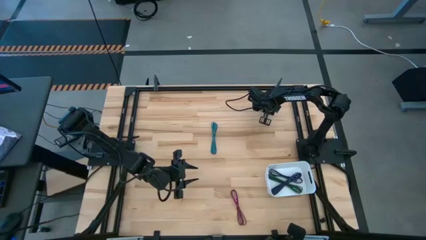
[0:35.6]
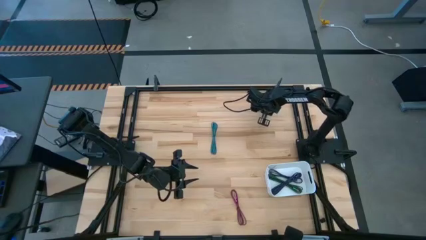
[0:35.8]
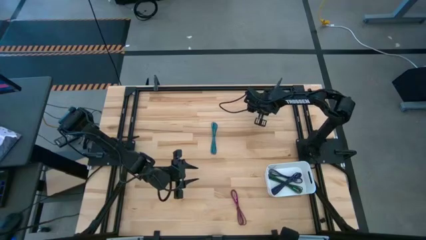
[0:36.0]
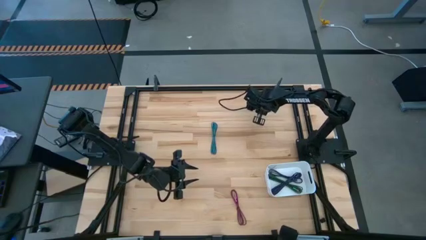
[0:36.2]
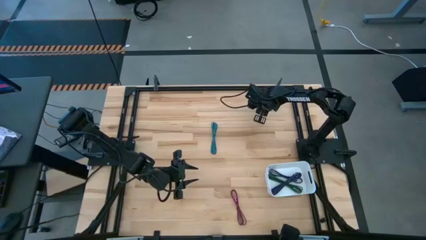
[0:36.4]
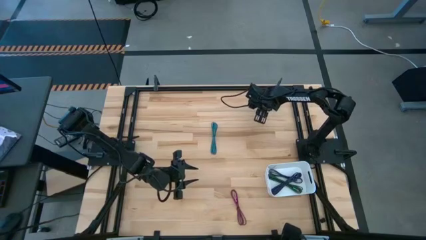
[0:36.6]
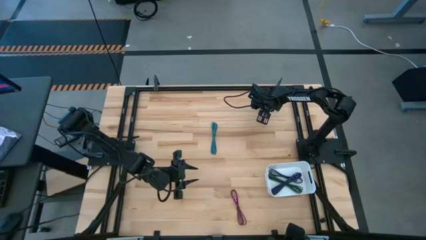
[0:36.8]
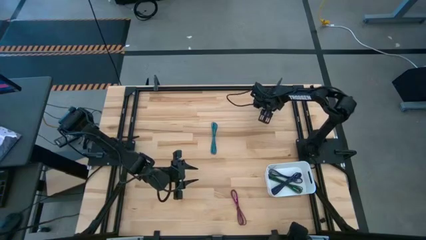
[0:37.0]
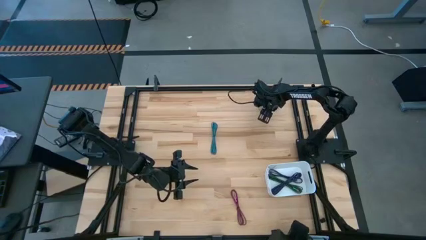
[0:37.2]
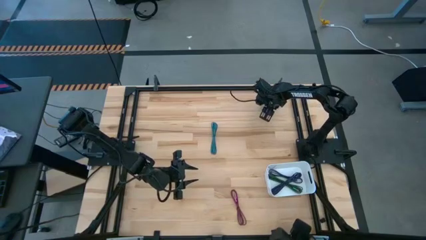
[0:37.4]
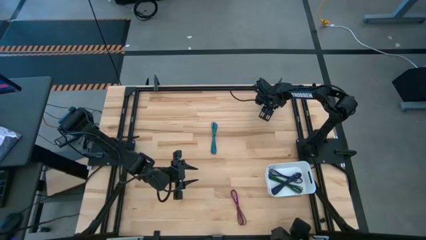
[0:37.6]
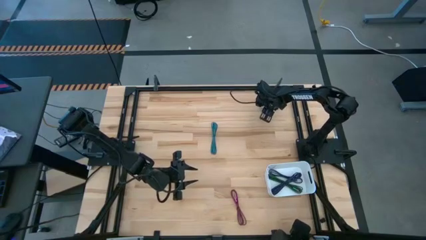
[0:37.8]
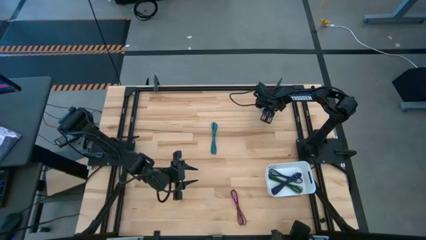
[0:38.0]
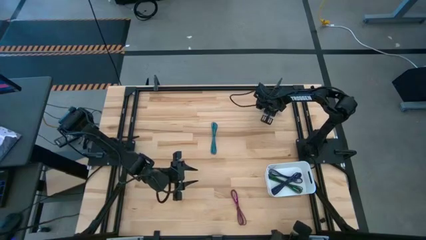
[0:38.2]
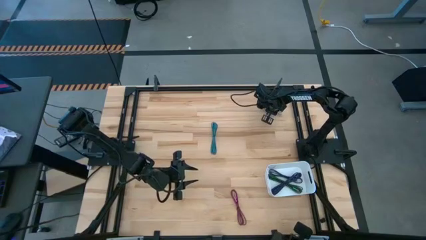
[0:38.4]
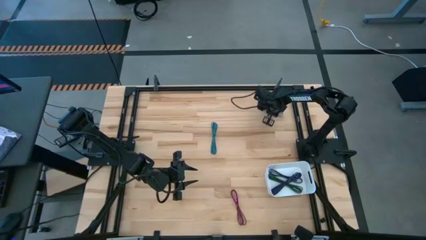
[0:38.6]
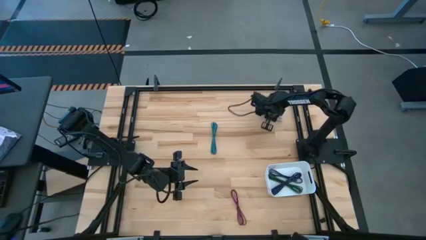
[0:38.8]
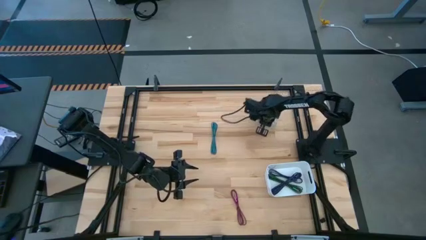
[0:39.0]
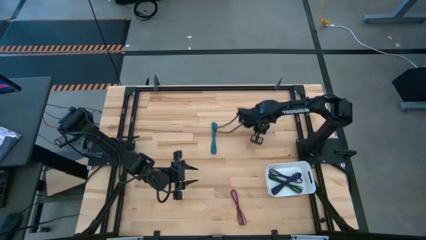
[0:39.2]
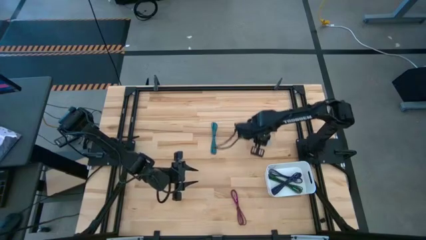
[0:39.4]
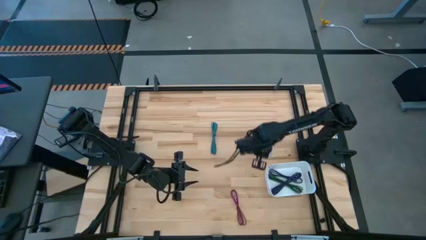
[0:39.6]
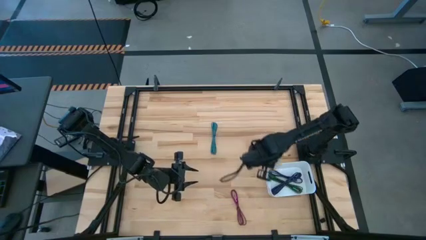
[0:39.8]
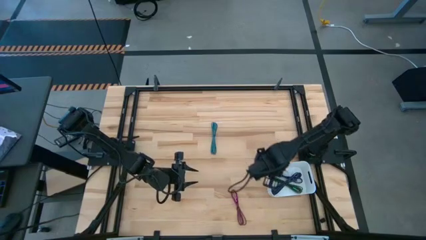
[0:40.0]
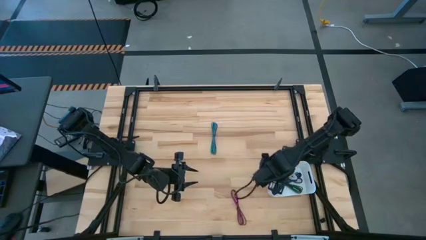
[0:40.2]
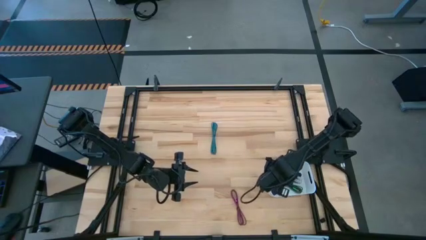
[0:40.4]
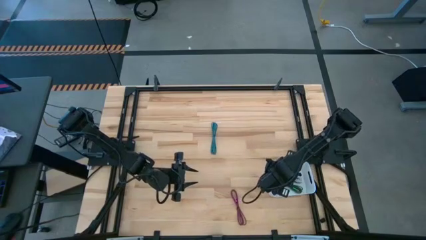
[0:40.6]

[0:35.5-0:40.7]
Task: Pick and place USB-C Cables
Put the white charger cable into the white container

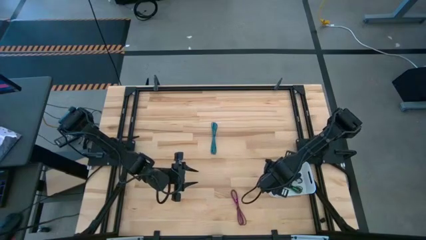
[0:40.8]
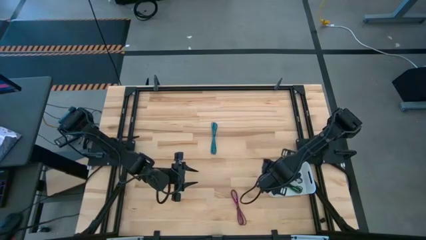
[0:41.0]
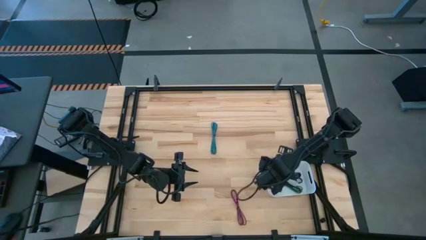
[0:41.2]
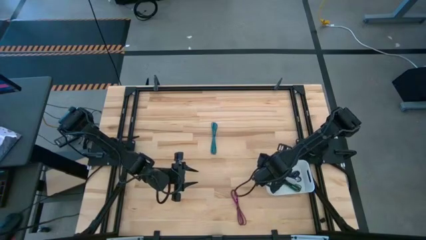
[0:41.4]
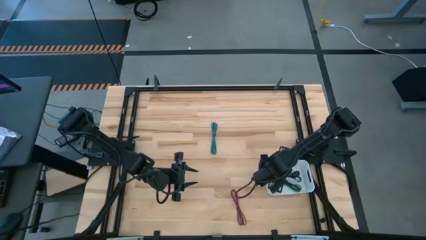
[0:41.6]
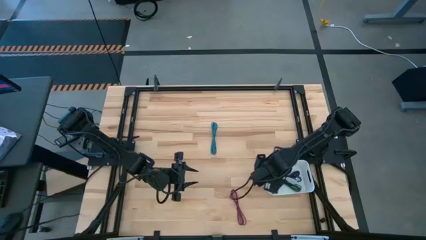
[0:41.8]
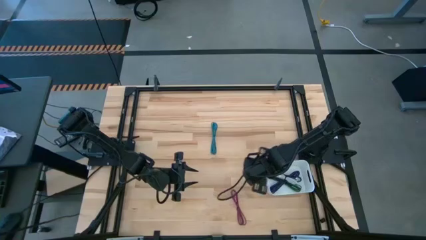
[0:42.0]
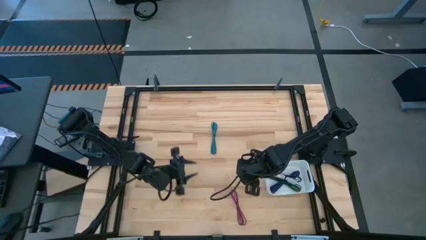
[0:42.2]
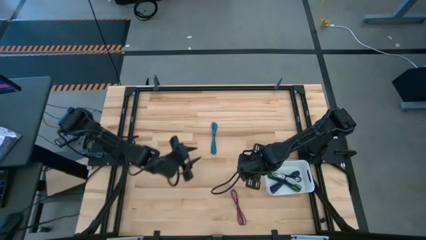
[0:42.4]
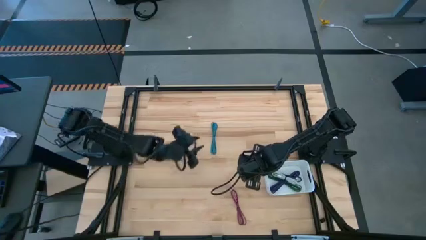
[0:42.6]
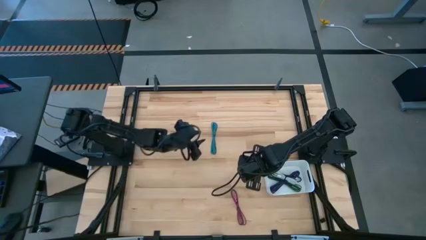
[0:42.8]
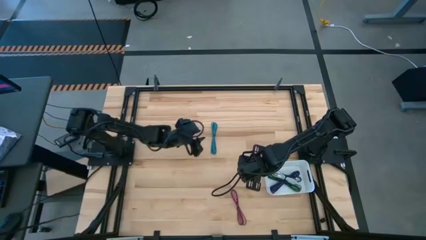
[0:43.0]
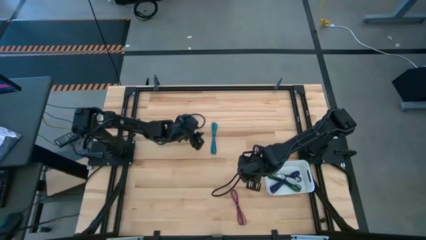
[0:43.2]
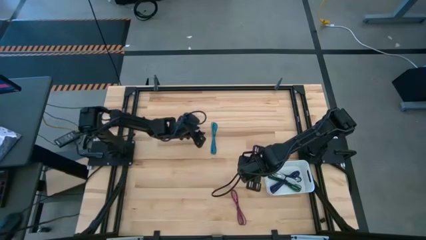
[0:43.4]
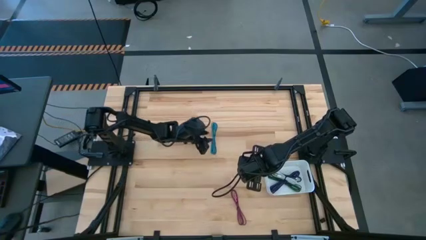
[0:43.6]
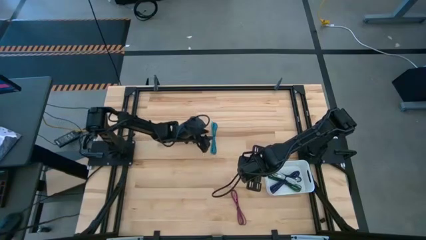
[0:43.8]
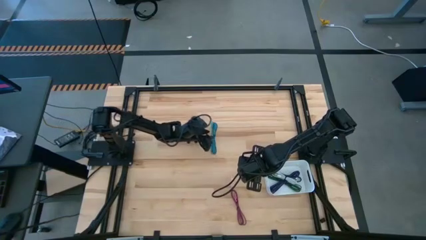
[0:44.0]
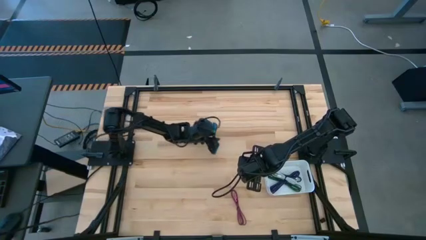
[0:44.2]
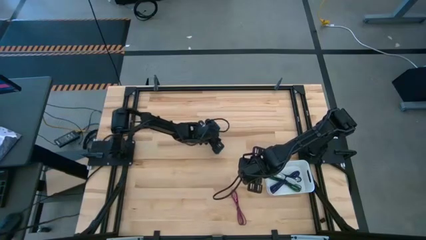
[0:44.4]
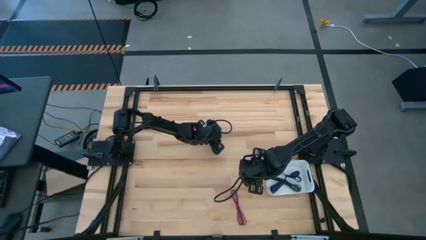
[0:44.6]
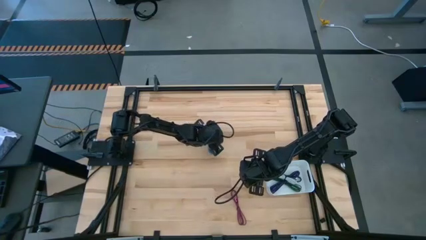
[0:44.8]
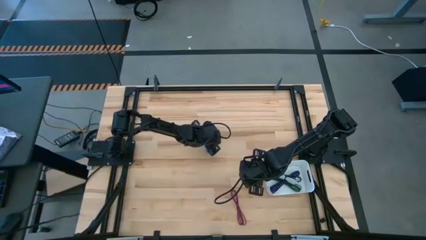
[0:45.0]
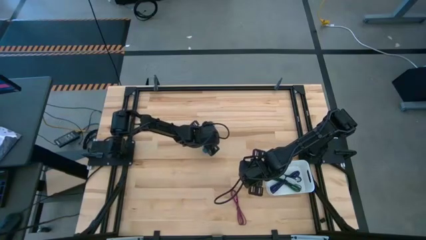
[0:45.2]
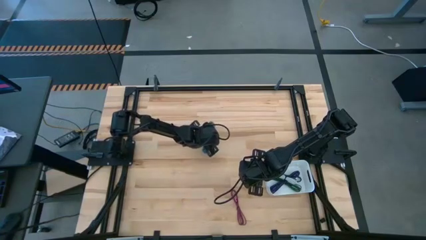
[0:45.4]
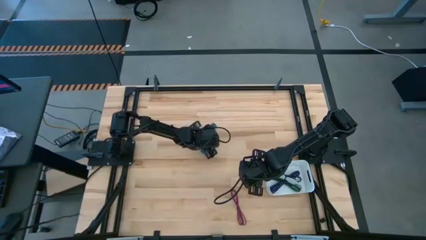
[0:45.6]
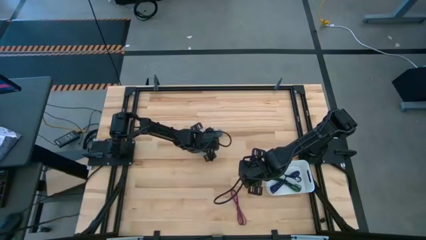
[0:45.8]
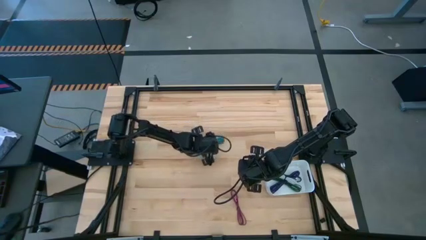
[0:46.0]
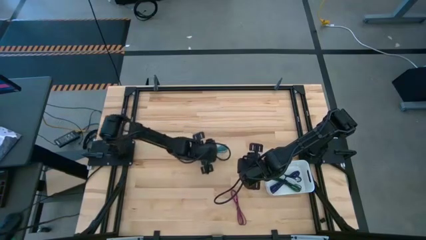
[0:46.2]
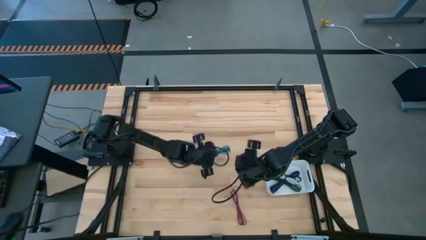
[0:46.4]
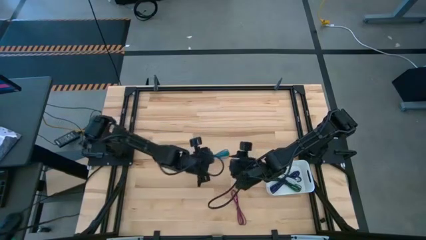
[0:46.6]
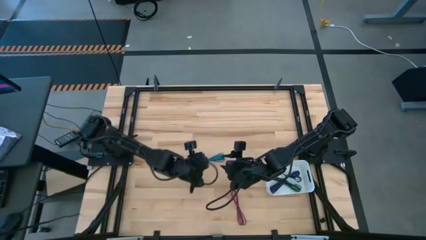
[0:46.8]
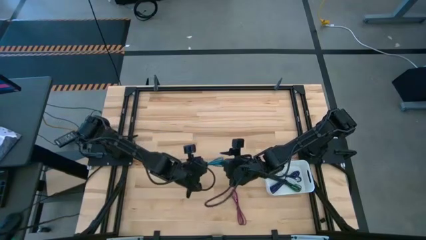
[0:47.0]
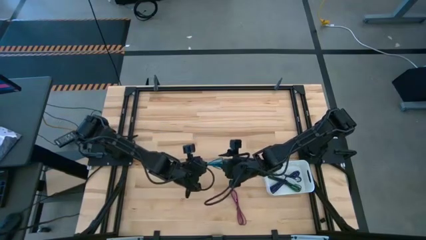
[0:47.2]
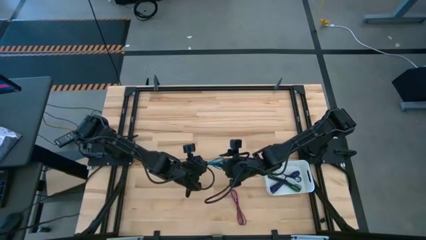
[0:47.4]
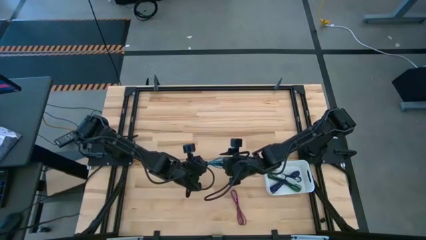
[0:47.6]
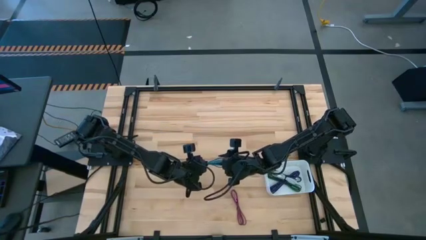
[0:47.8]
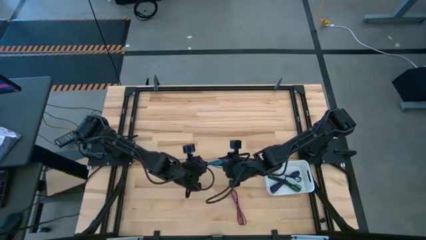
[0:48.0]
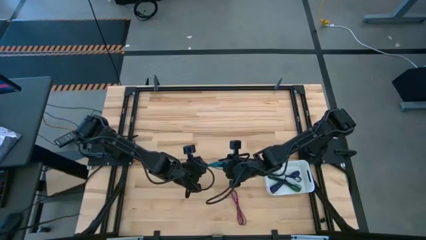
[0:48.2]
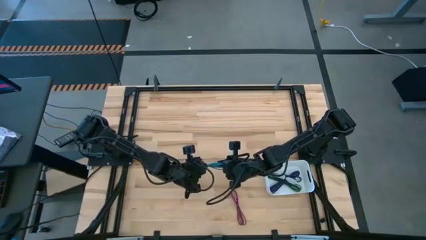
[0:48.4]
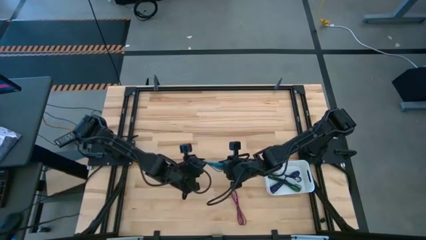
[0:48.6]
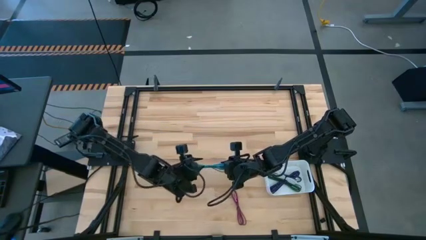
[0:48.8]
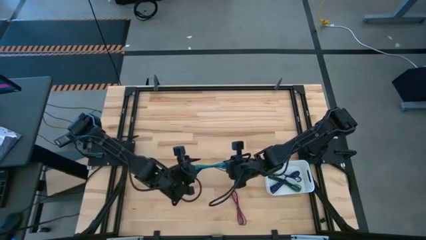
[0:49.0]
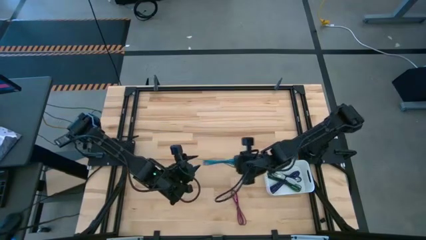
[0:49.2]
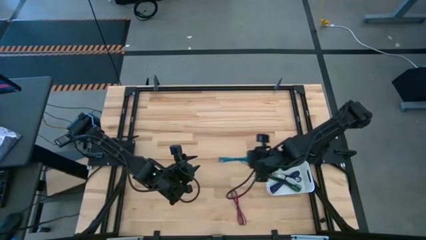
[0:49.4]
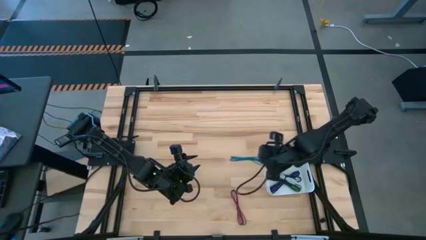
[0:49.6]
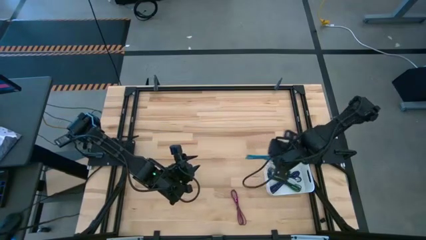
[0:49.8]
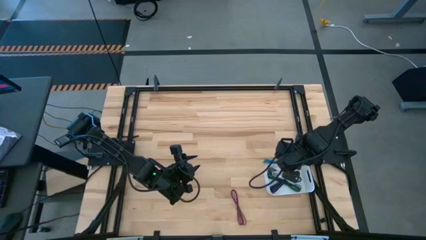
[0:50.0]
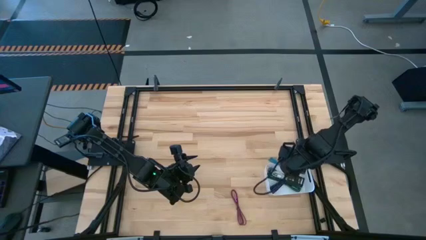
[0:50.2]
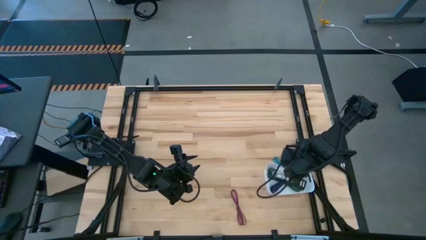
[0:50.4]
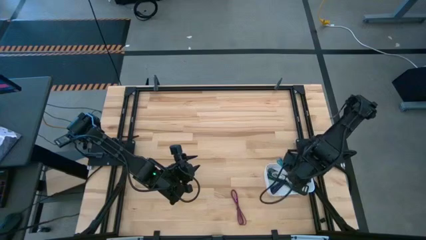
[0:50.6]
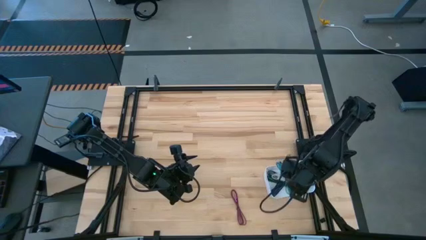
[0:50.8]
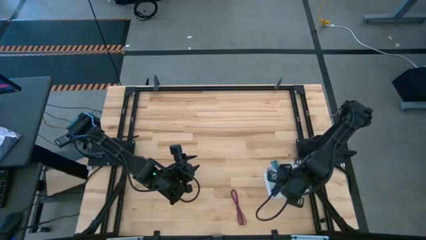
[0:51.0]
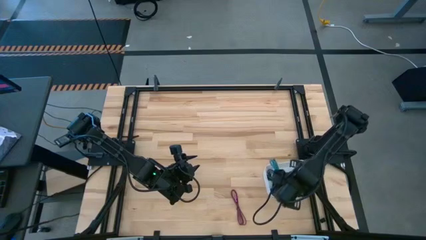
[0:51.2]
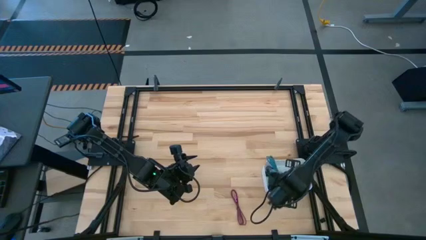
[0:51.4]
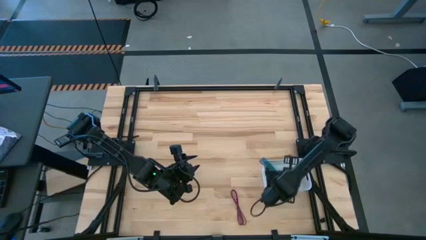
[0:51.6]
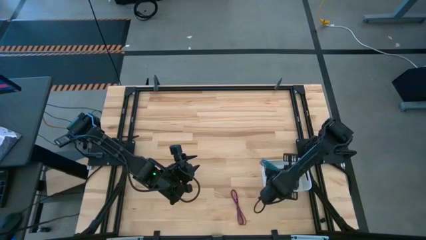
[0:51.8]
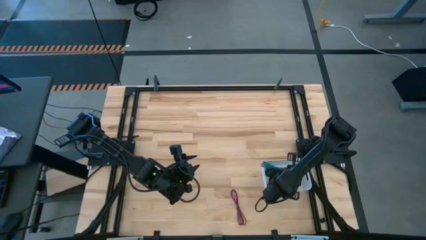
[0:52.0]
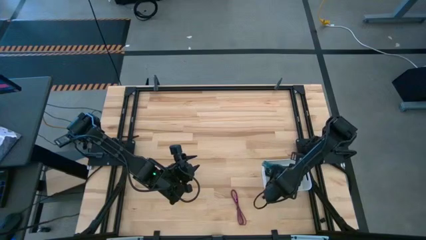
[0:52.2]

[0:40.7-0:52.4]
Put the blue charger cable into the white container
